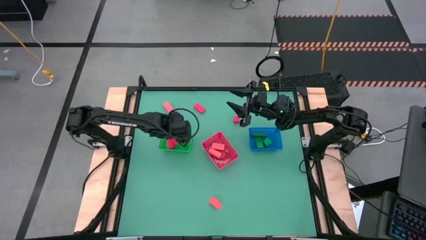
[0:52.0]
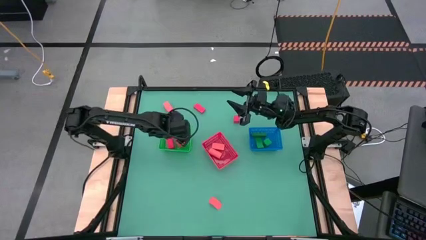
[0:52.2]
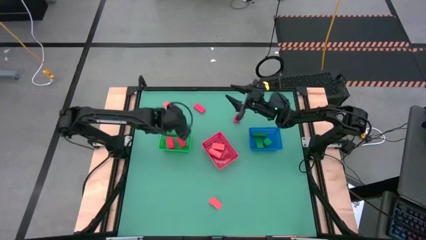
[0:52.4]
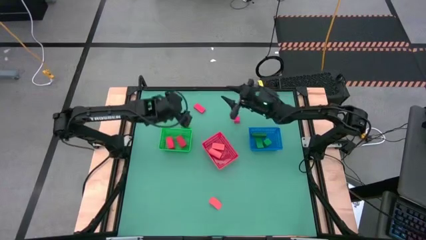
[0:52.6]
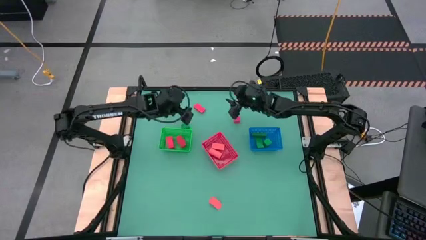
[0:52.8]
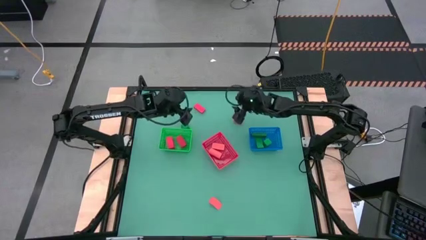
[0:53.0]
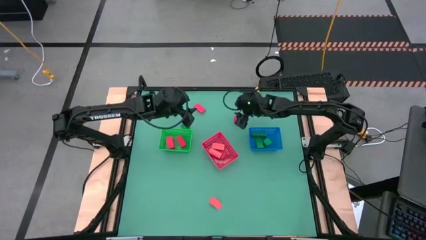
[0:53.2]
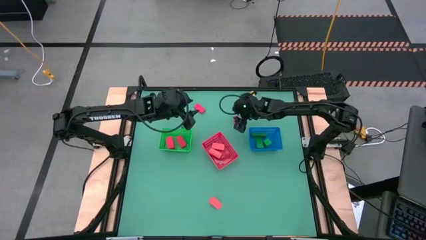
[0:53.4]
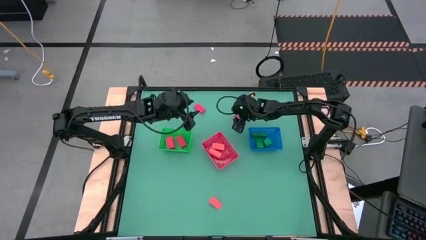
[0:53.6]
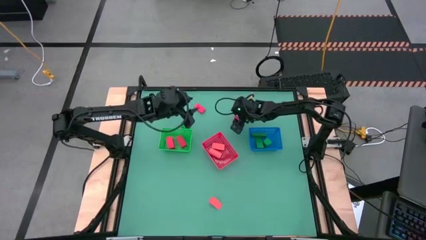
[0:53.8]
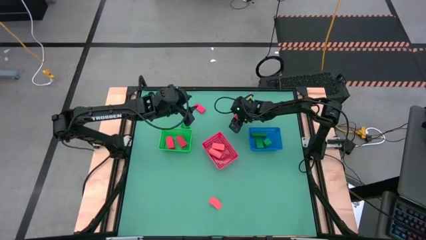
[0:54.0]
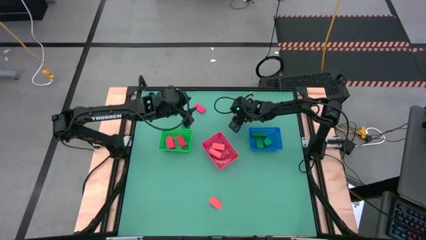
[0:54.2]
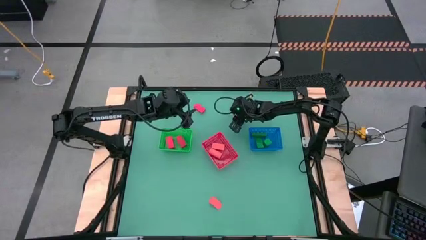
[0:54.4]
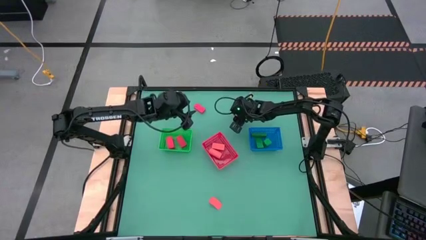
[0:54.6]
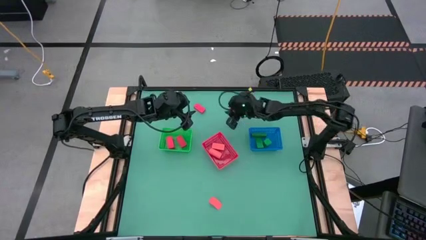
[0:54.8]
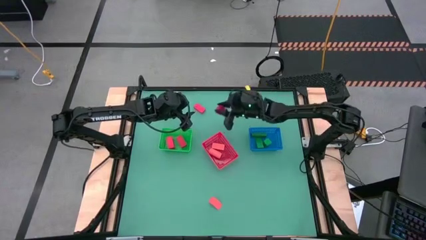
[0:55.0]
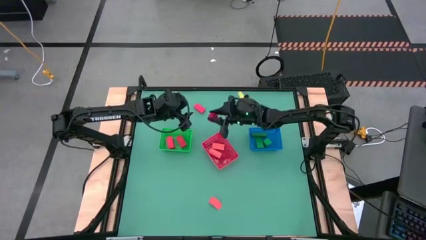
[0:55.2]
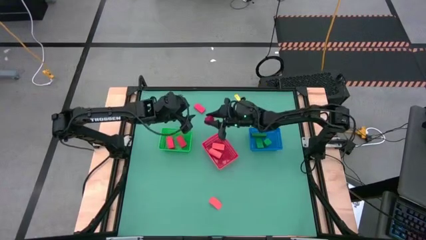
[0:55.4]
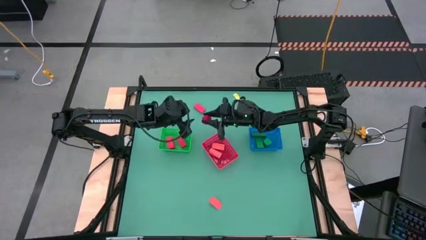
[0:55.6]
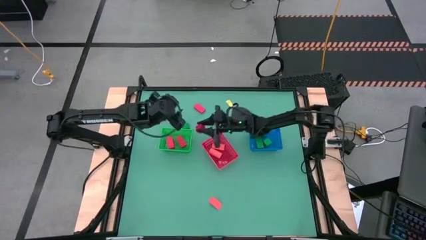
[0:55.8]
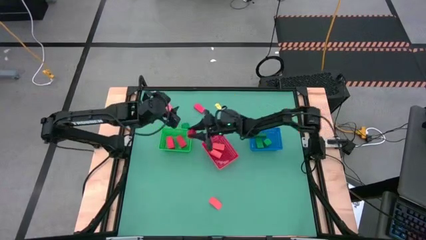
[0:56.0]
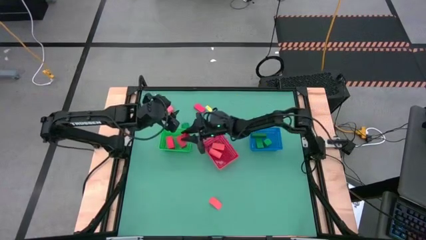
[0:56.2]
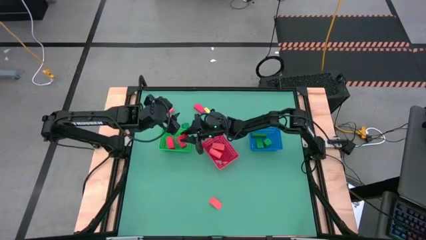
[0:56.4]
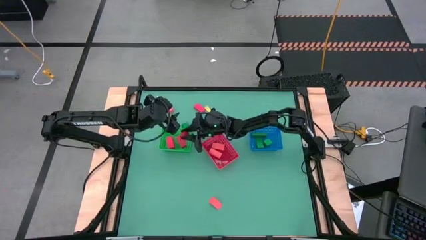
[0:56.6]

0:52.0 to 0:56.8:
Task: Sort & place blocks by color
Put the red block into the green bin

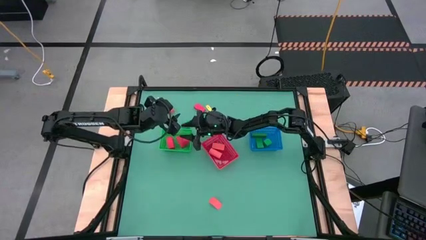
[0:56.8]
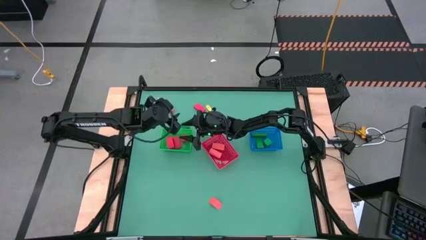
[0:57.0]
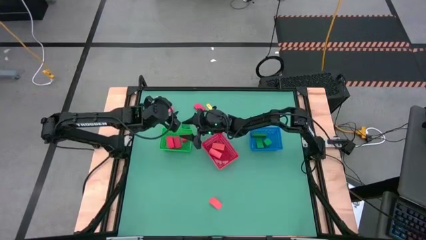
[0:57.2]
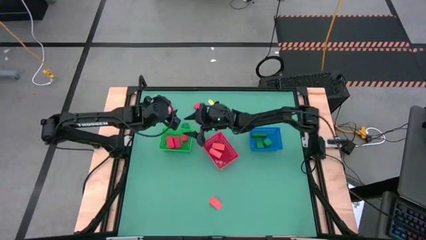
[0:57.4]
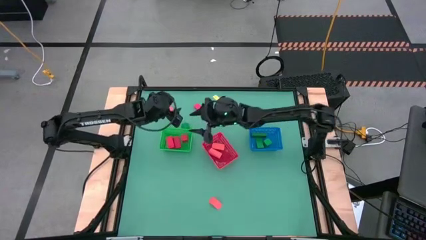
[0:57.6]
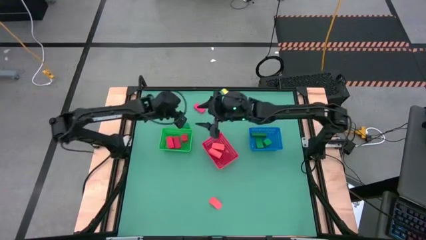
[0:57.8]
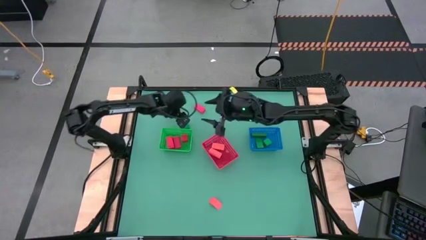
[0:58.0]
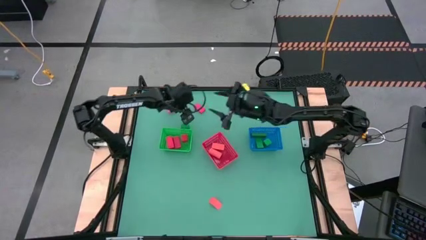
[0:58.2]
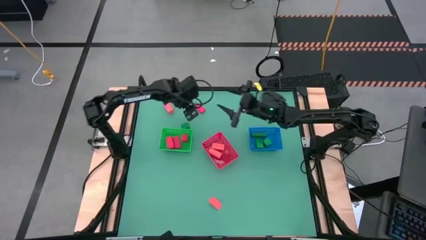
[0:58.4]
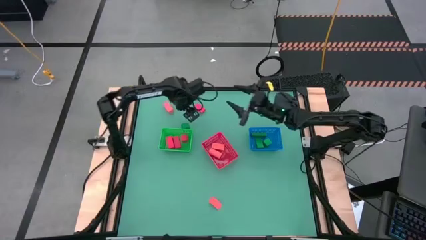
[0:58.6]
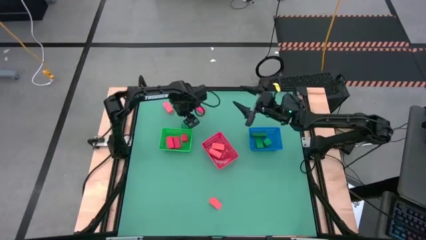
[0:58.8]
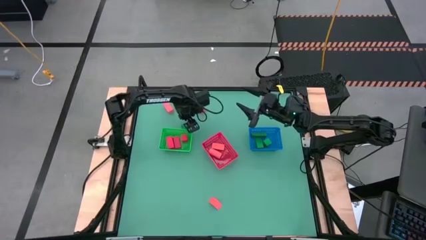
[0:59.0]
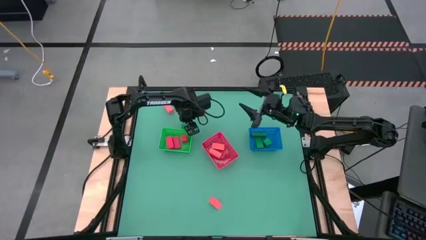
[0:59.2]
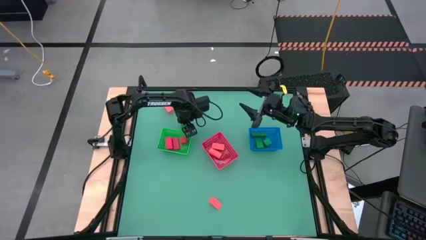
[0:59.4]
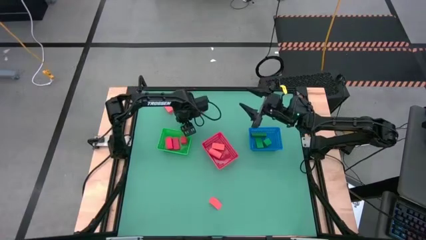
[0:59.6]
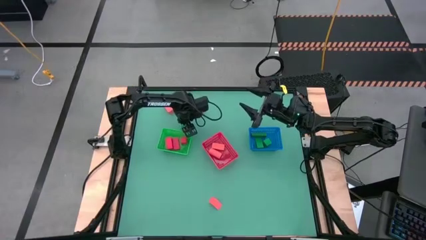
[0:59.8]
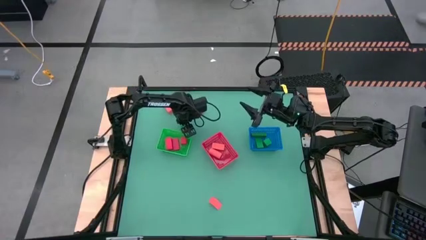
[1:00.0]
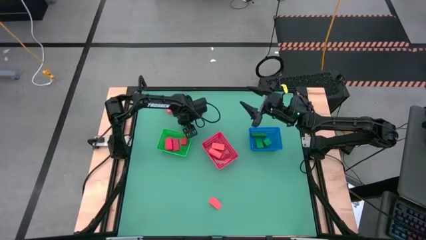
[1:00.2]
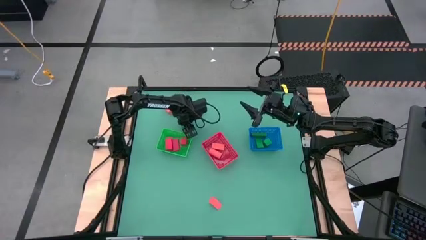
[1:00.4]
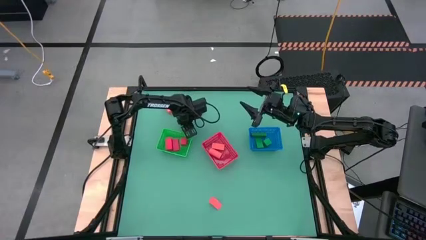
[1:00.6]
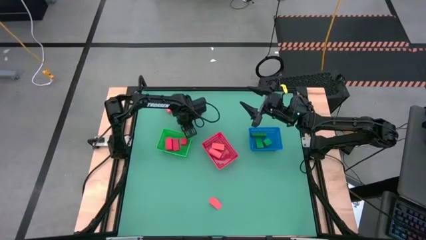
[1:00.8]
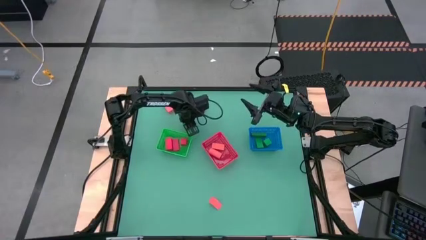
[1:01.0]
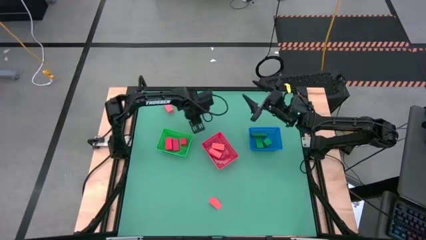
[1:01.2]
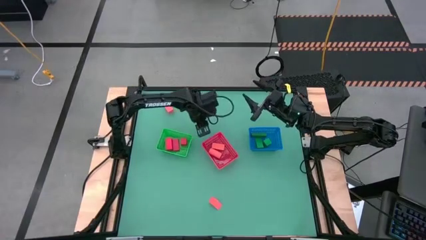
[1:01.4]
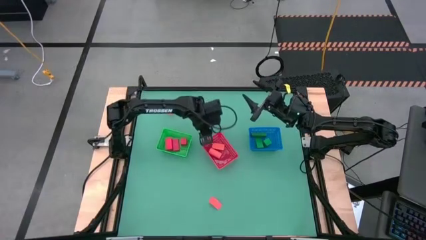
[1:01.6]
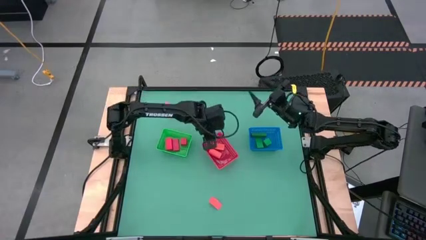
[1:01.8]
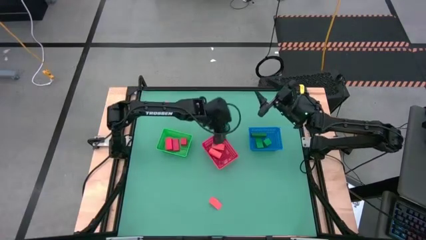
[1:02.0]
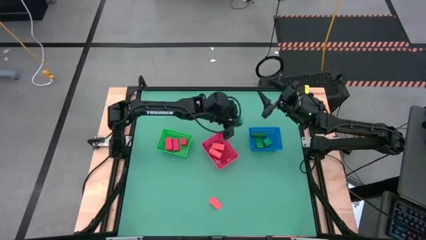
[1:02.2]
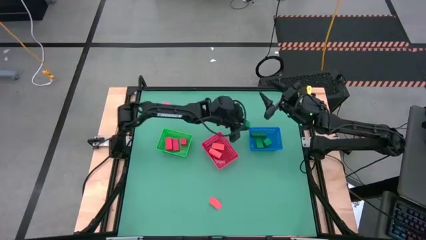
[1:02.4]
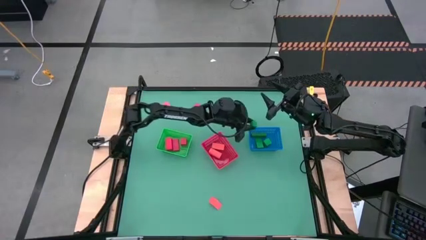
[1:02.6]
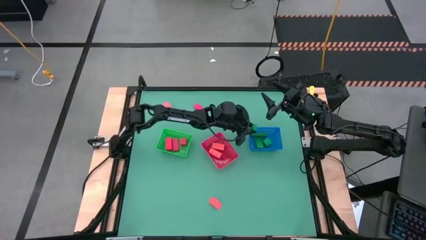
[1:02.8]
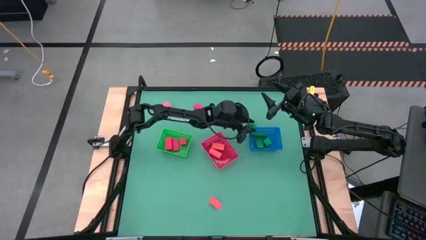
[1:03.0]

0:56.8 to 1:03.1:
Put the green block into the blue bin

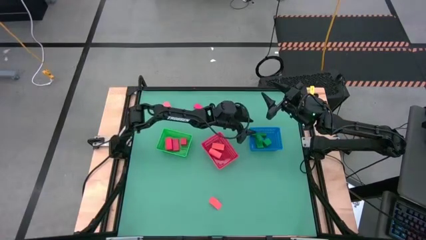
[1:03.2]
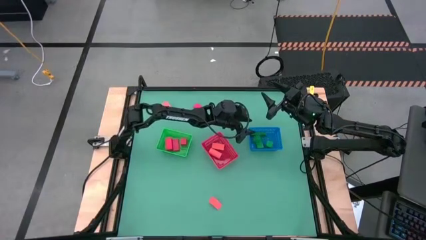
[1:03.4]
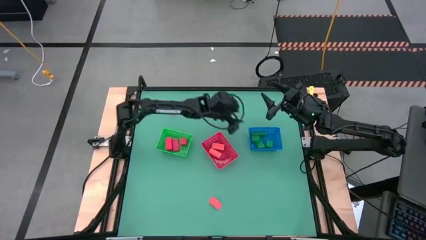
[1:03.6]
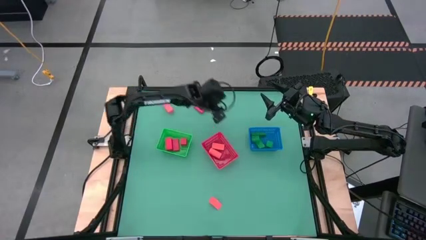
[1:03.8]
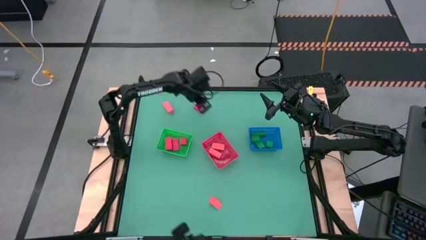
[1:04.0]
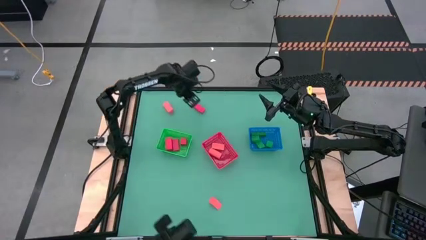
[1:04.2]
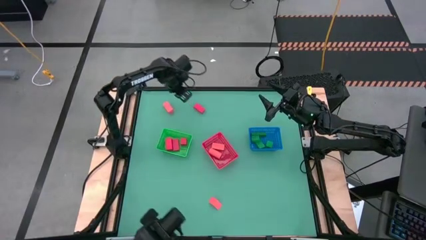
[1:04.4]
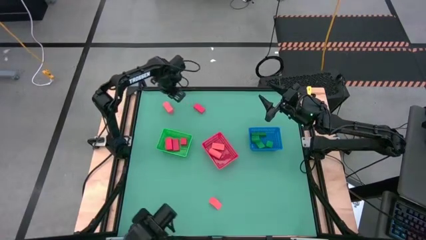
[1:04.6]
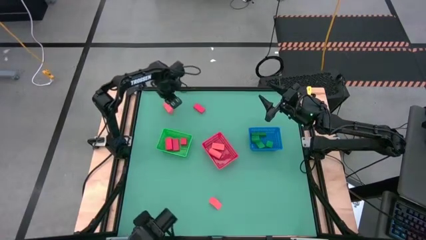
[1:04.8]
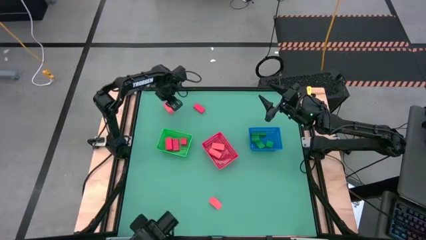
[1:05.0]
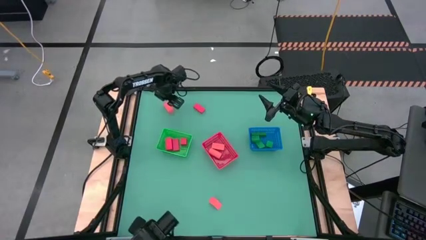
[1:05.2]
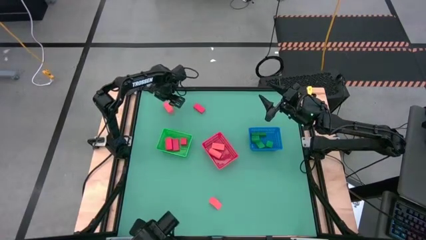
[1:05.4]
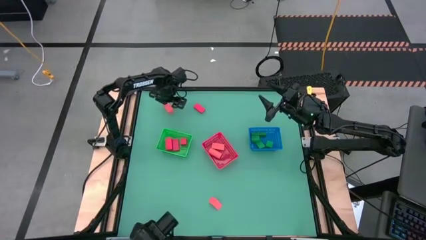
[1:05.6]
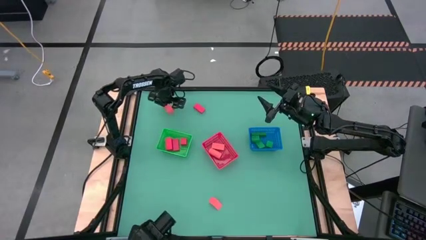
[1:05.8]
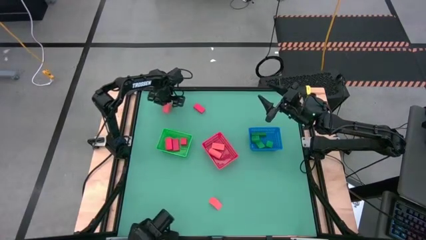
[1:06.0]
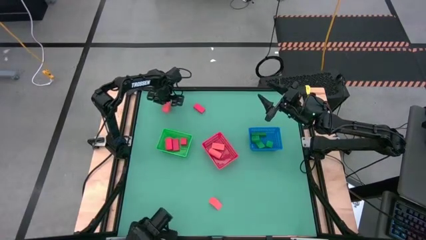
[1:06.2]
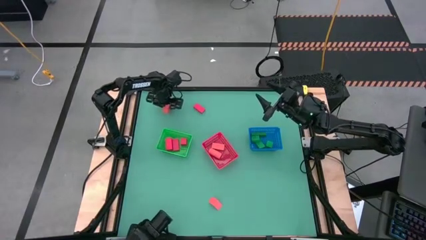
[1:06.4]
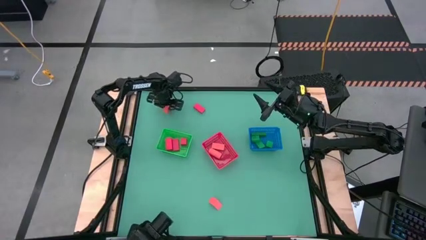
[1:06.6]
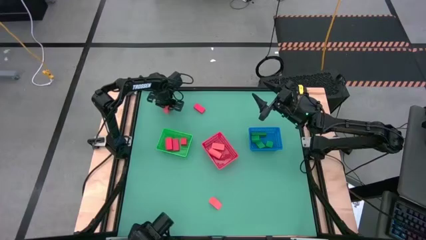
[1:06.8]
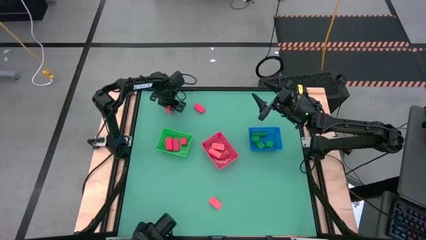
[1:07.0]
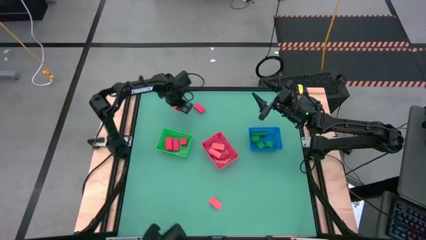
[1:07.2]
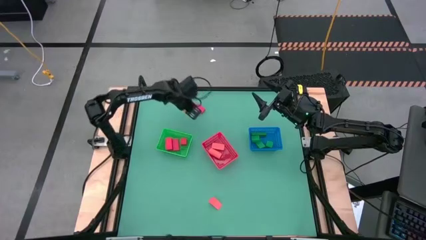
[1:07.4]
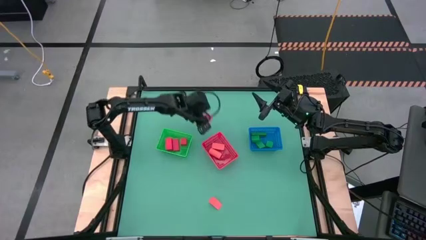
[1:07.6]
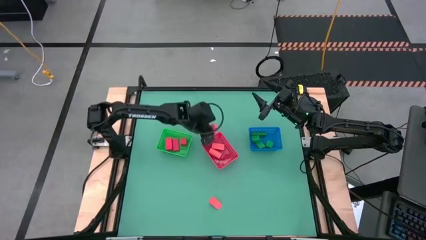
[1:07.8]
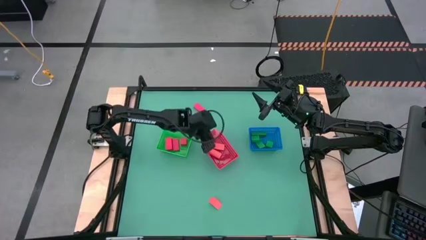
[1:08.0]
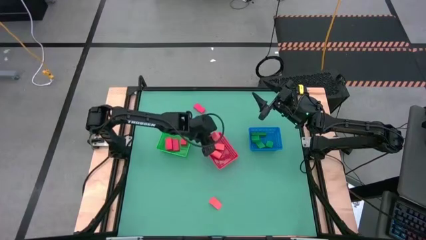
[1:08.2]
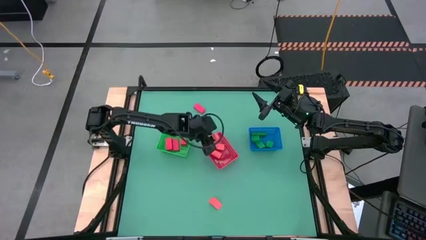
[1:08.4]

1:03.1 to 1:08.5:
Put the pink block into the red bin
